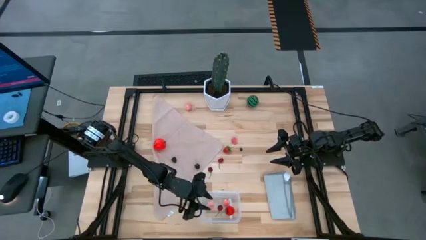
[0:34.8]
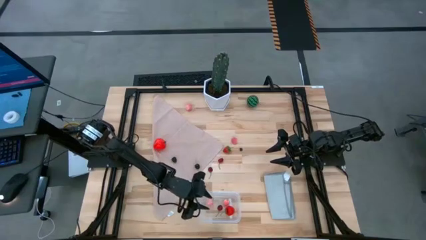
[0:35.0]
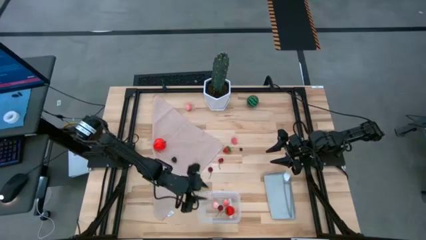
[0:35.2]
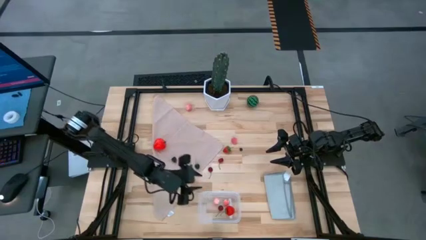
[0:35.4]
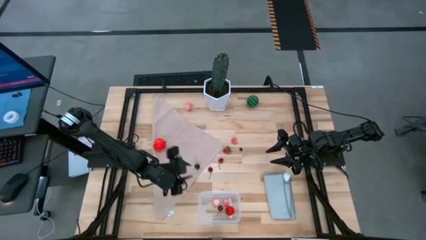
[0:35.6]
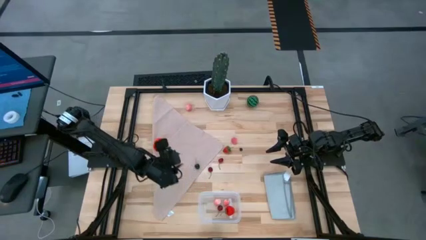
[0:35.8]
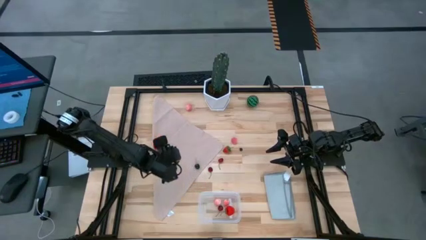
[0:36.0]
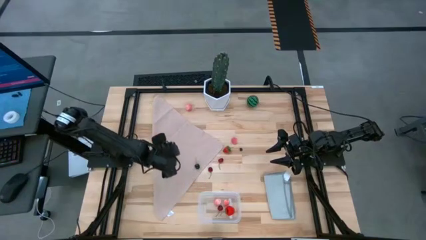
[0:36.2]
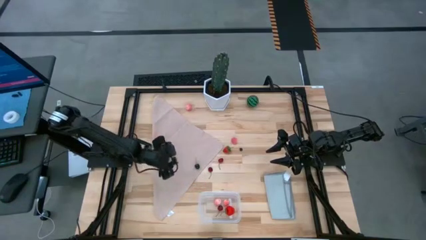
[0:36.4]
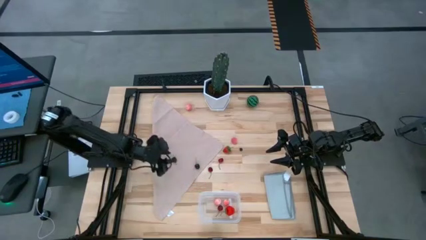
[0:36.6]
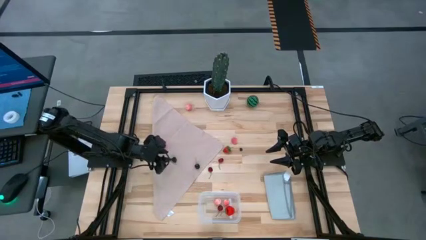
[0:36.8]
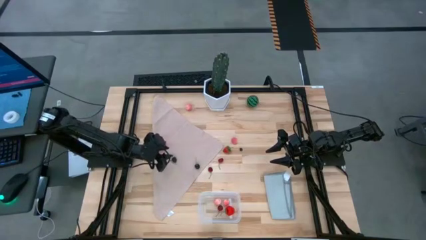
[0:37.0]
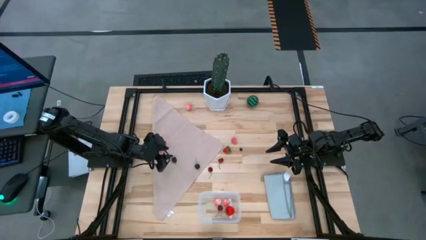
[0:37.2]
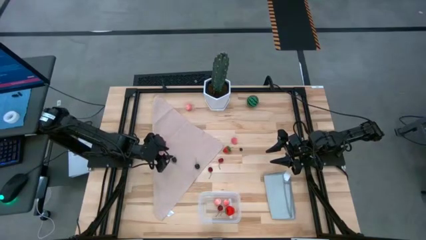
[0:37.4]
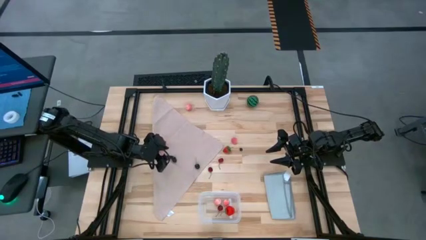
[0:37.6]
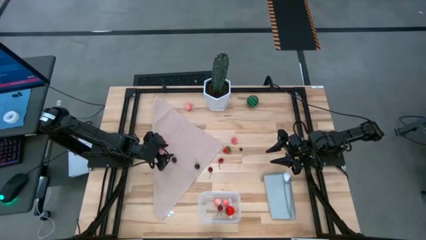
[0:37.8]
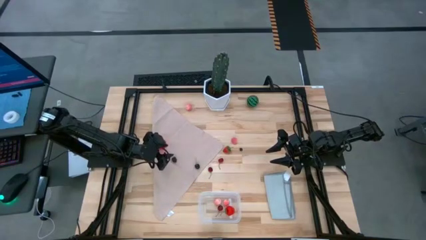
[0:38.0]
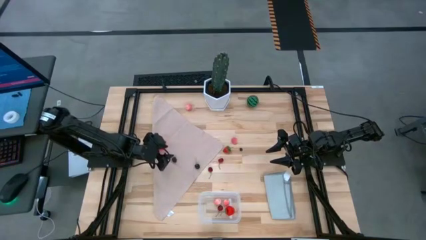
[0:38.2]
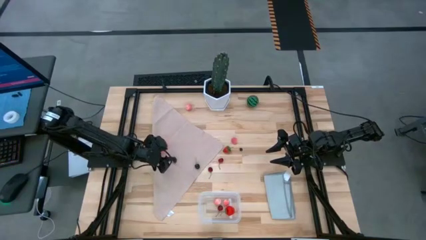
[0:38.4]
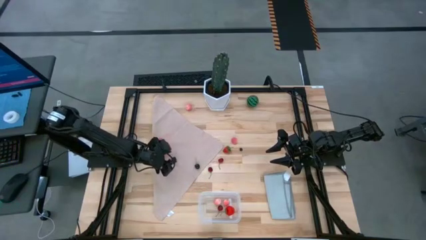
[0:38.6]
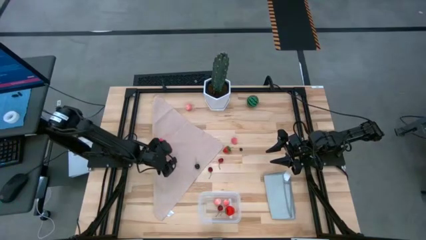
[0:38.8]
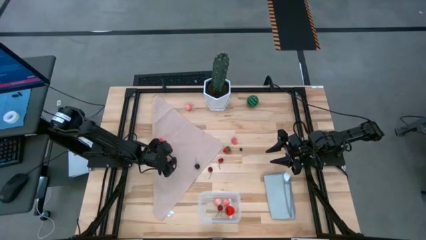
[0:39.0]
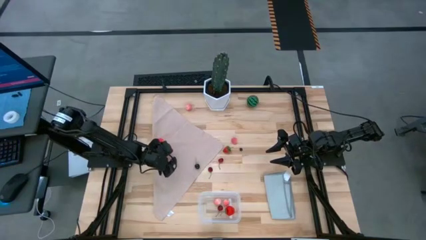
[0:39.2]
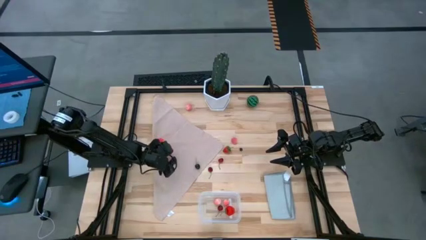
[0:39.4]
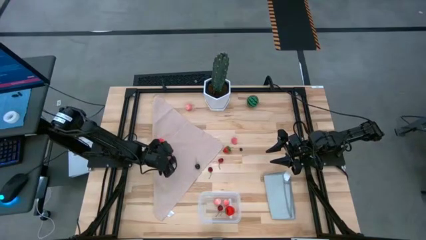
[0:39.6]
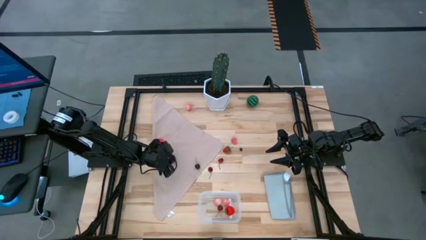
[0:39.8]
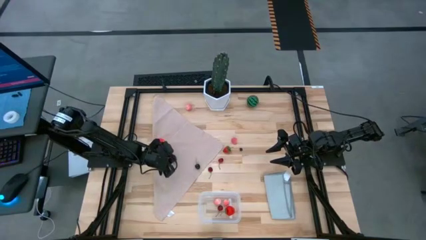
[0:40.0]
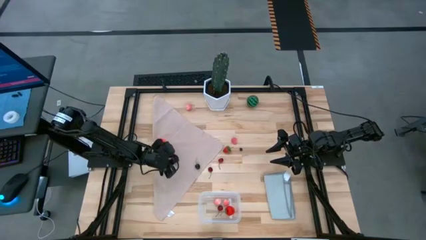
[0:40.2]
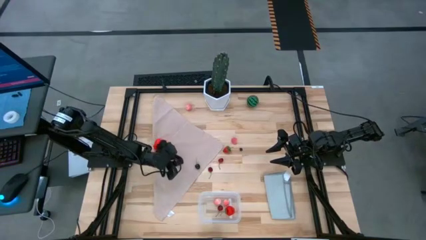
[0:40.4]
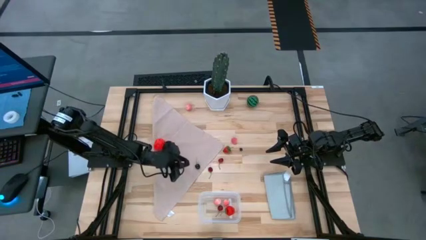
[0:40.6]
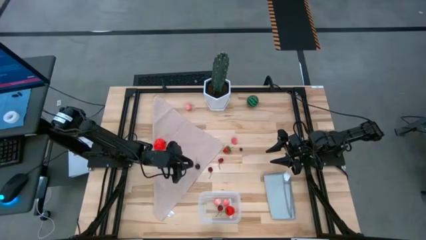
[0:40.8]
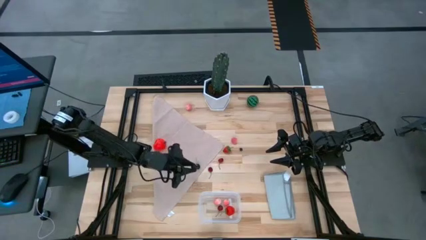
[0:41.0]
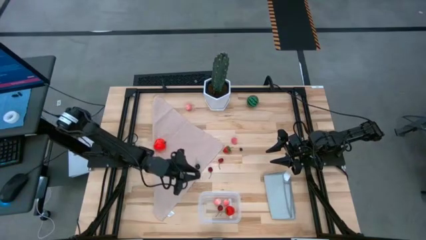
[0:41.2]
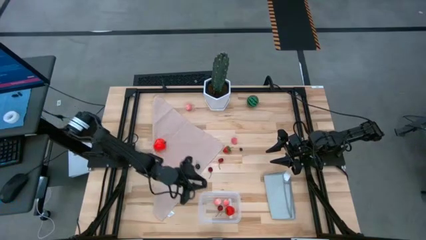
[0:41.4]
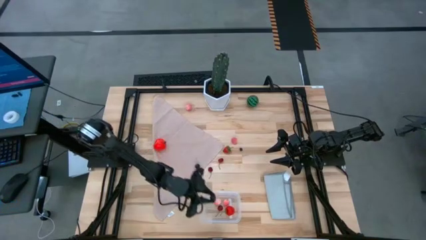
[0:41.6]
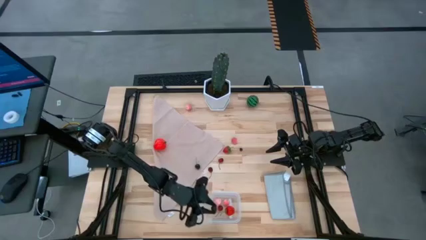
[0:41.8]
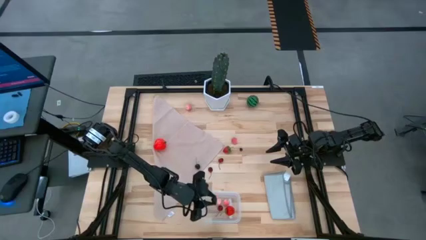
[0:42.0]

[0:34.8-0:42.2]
Task: Pick and placing Produce into tupperware
Put the blackberry into the transparent bin

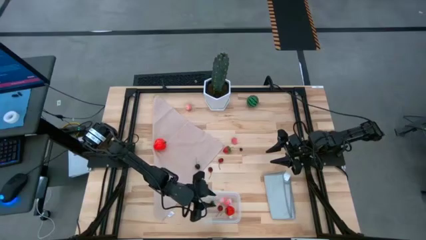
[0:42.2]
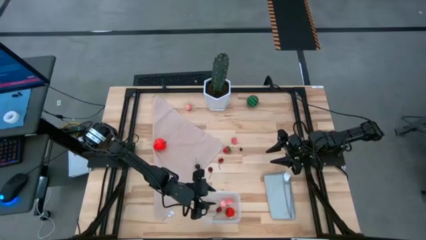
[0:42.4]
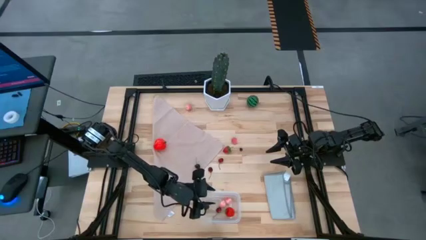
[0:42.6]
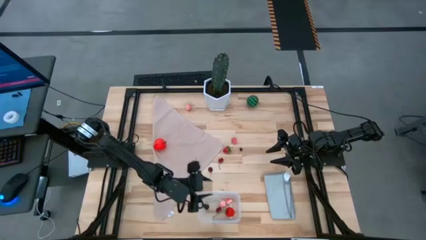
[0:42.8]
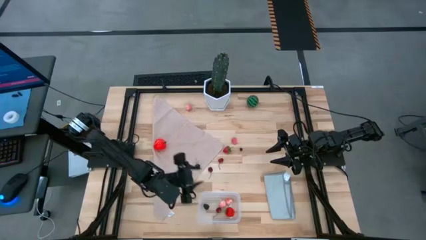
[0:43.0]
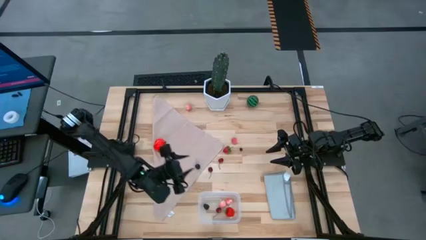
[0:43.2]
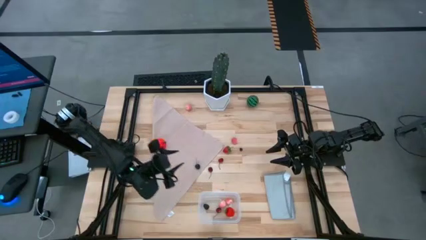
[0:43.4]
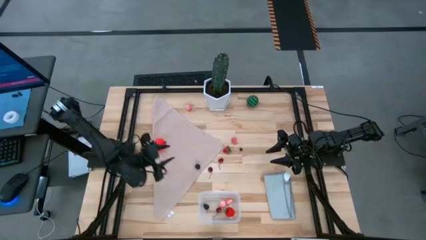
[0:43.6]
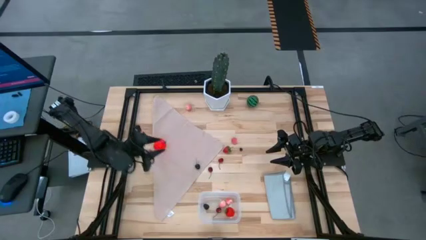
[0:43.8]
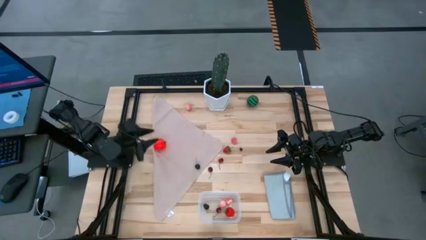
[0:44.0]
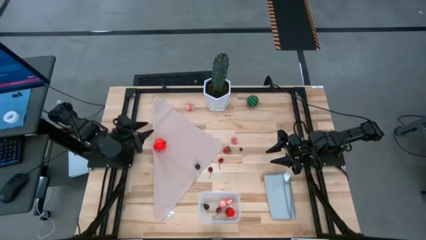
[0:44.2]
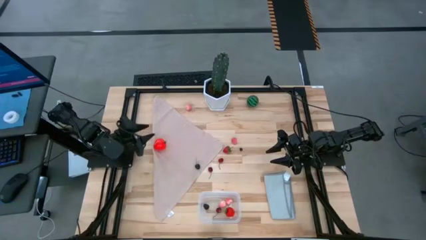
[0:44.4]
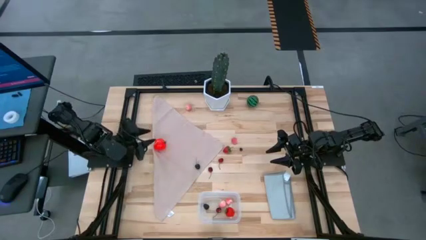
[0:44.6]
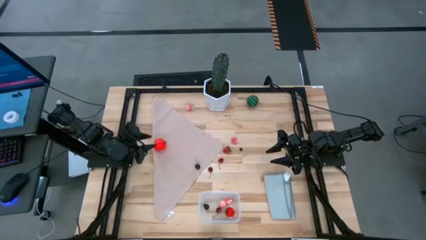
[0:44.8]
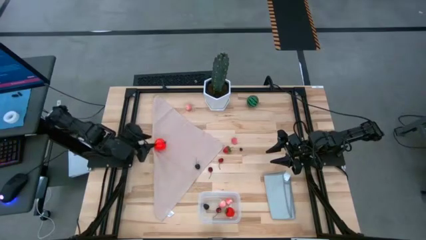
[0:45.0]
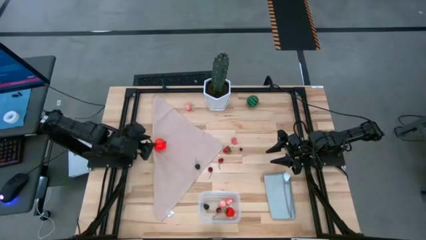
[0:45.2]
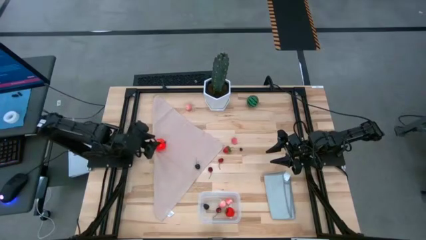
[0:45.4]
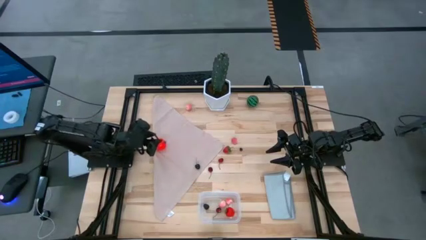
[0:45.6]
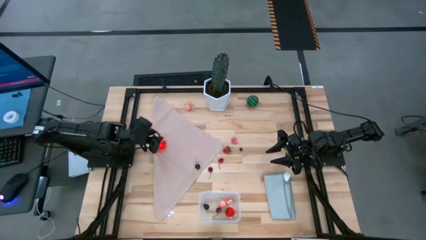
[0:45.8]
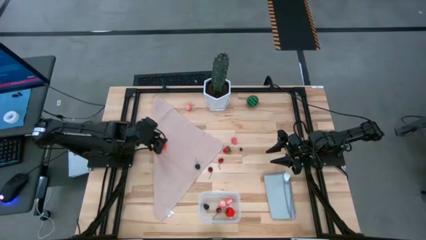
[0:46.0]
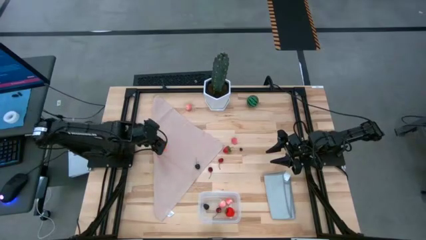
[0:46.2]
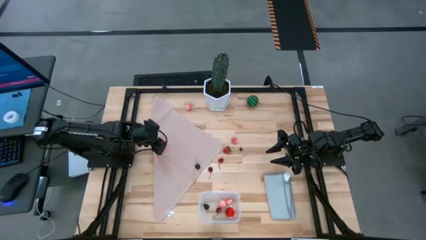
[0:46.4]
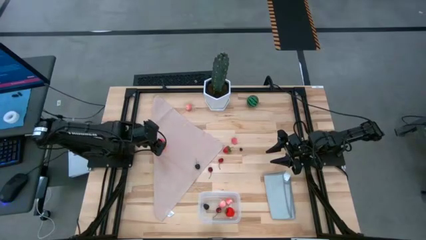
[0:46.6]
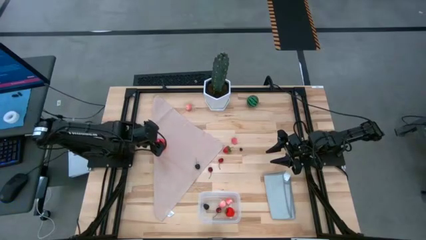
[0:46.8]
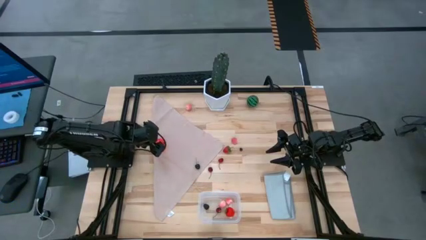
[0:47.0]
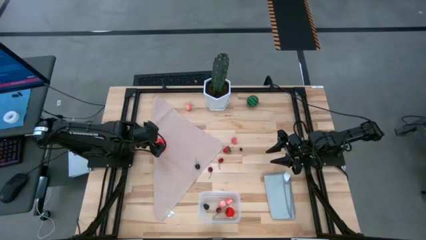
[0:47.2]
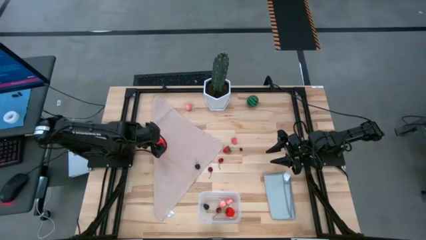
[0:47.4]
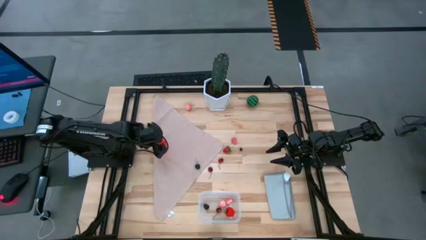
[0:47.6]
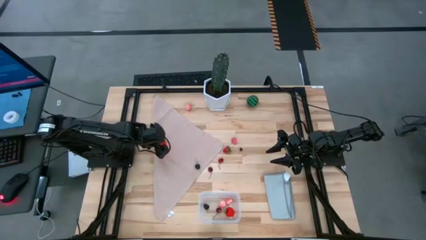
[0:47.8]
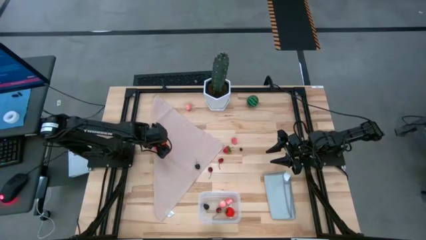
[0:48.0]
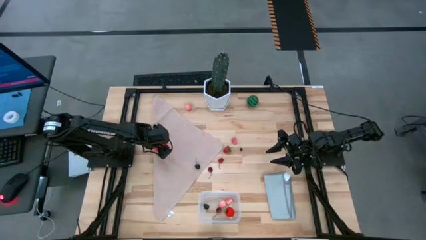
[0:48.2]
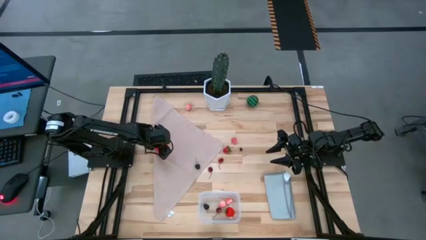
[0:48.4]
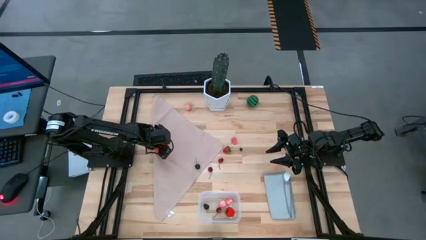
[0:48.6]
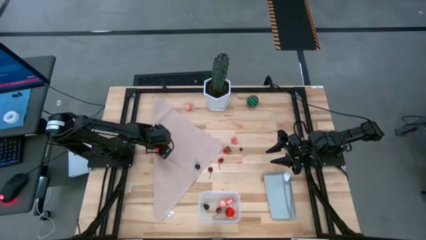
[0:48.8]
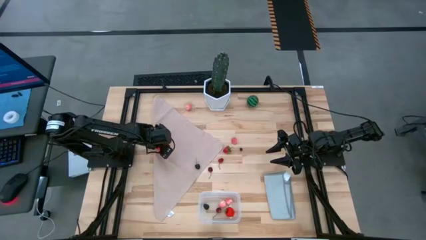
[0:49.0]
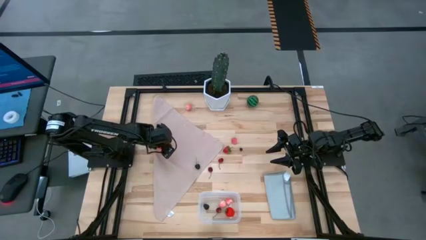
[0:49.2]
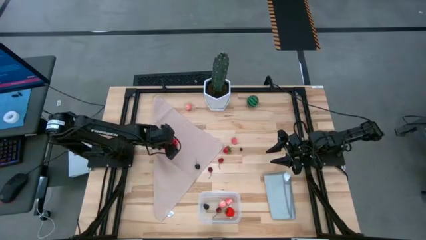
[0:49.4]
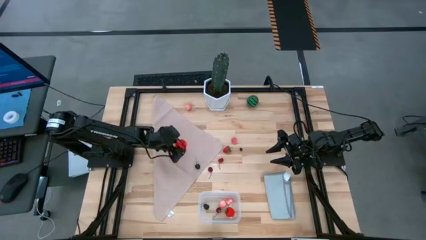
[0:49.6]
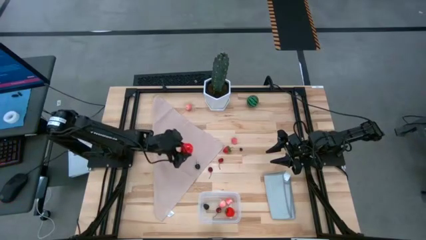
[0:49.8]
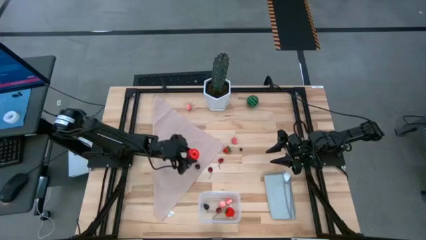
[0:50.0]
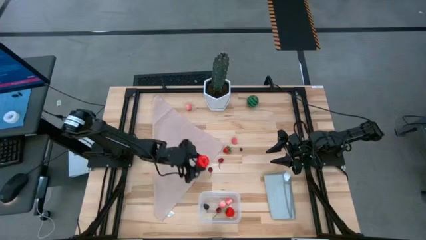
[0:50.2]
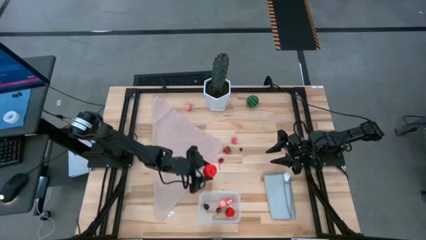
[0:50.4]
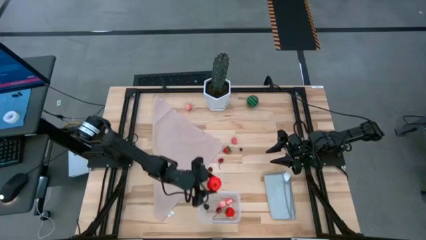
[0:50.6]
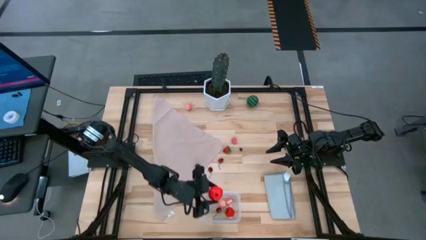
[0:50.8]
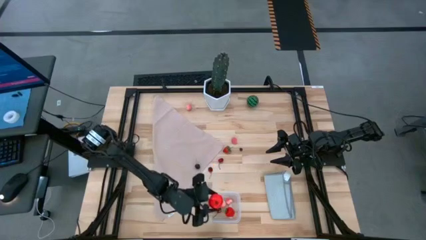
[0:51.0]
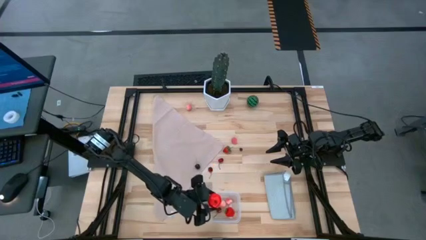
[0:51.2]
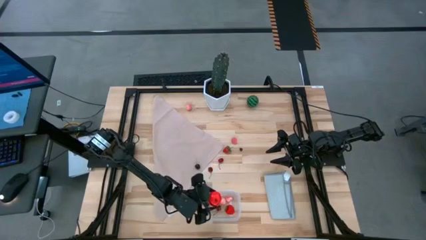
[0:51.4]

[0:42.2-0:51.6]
Put the apple into the transparent bin

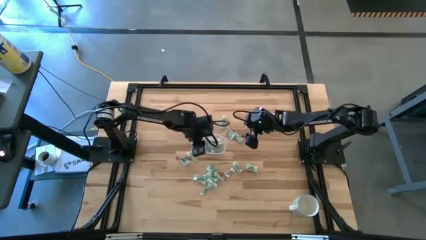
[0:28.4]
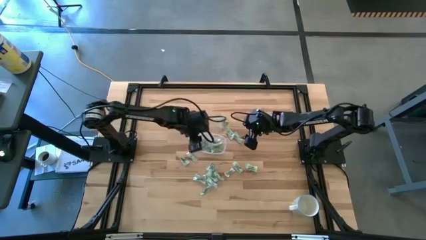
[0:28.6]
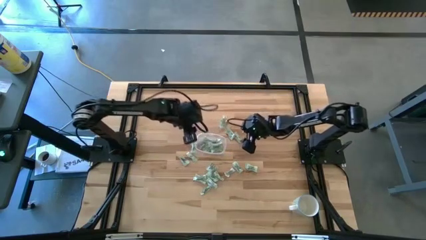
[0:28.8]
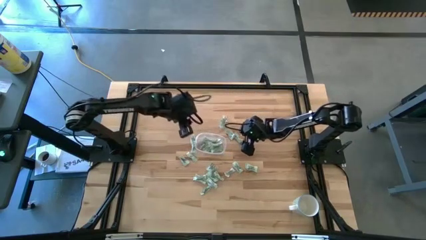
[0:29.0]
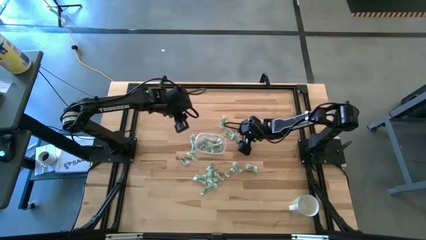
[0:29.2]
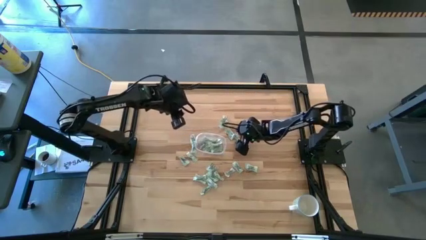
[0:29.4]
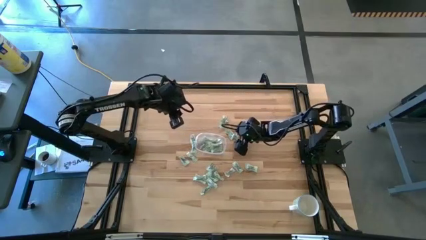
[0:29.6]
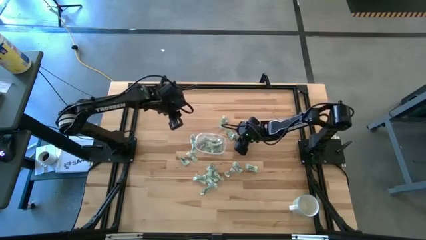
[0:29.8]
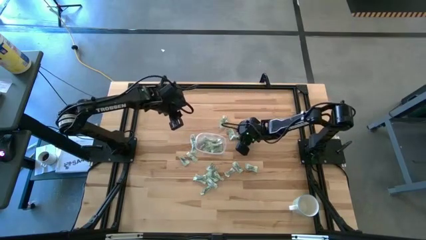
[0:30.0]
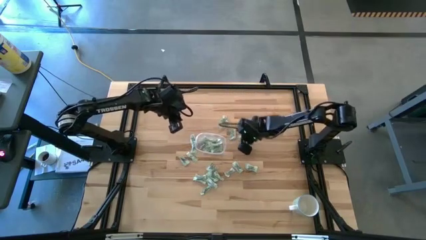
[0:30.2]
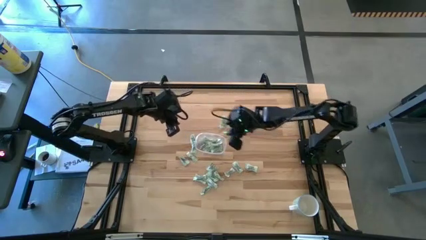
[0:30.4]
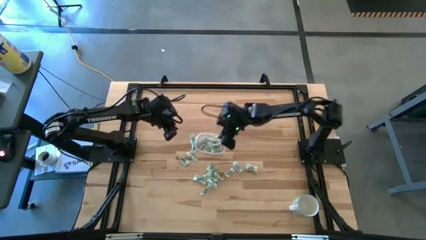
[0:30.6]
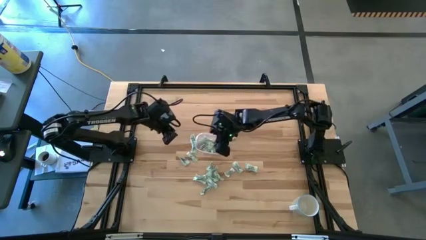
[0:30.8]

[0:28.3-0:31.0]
Task: Pick and place Stevia / Truvia into bins
Put the stevia packet into the transparent container
